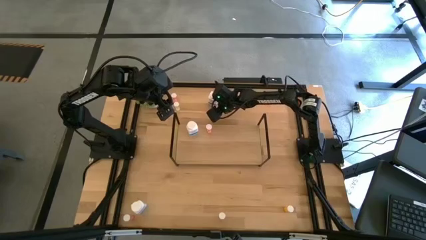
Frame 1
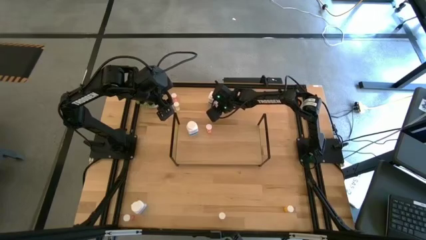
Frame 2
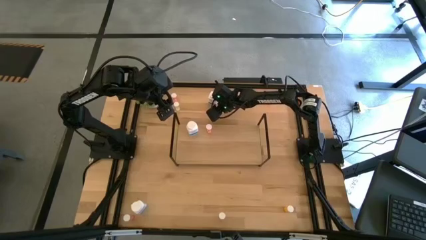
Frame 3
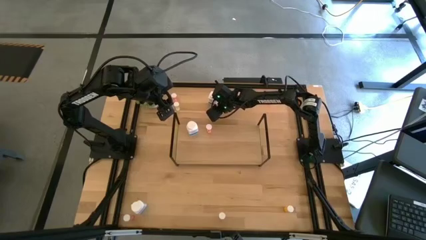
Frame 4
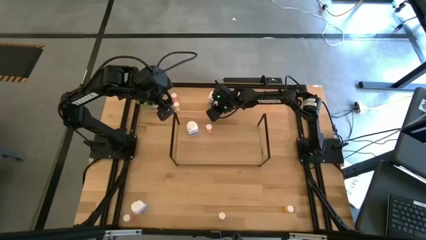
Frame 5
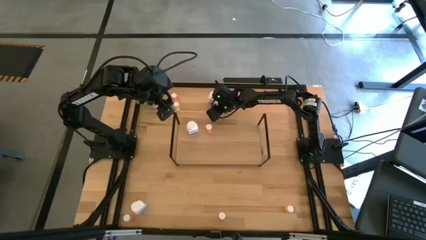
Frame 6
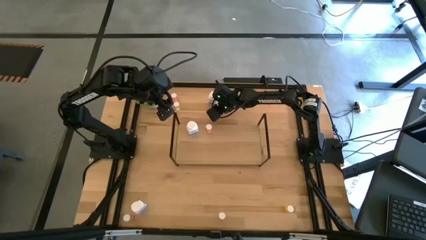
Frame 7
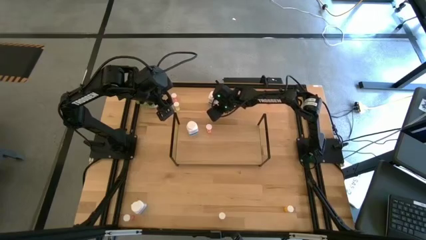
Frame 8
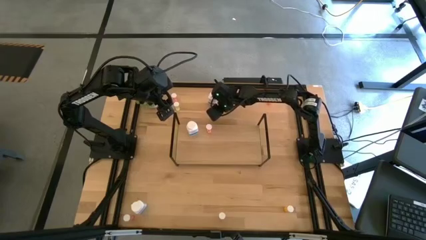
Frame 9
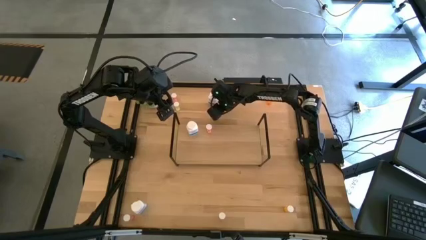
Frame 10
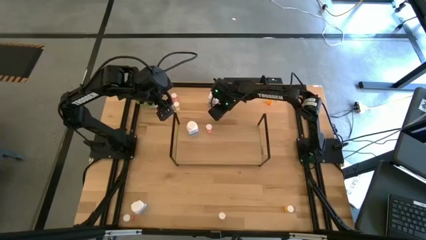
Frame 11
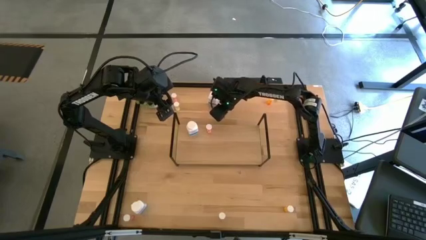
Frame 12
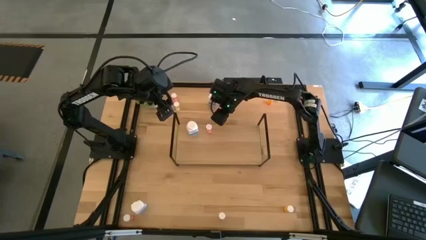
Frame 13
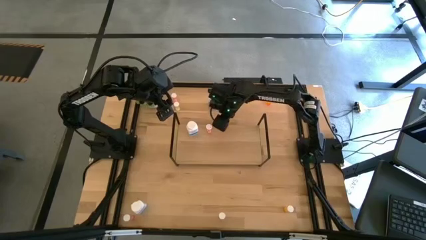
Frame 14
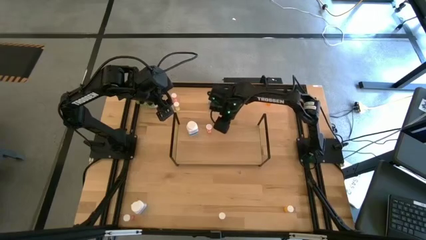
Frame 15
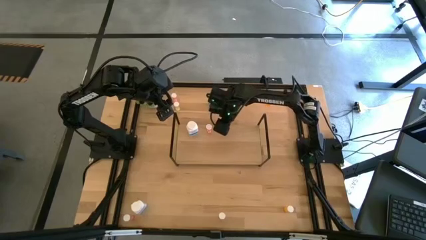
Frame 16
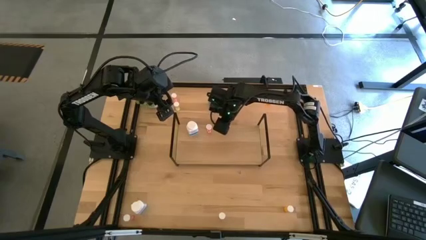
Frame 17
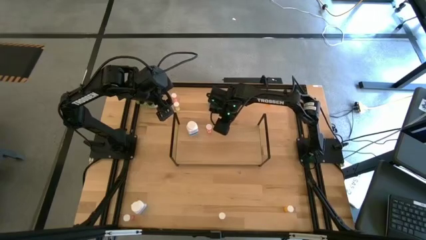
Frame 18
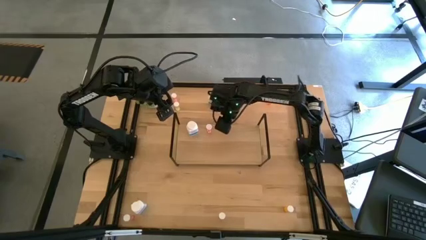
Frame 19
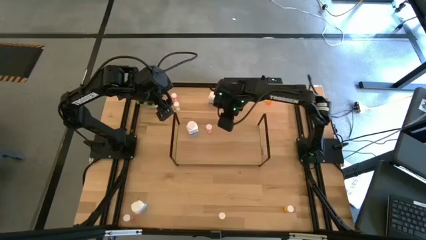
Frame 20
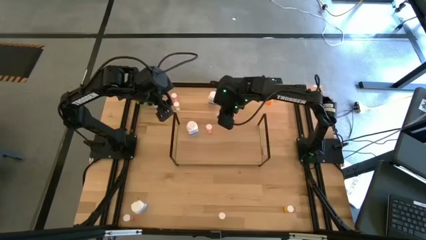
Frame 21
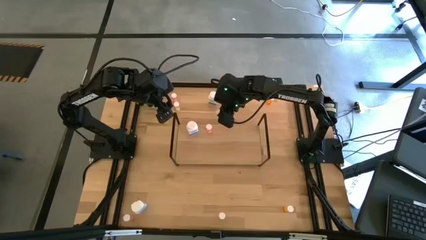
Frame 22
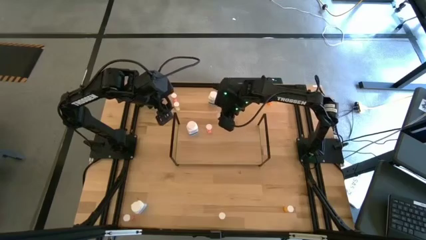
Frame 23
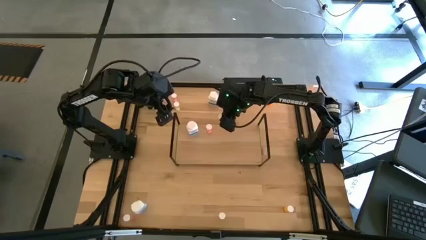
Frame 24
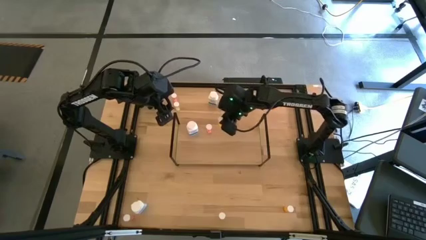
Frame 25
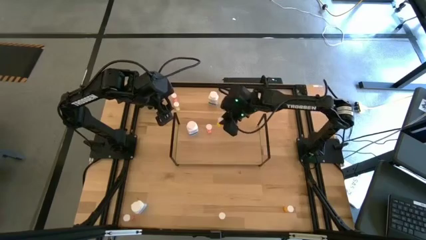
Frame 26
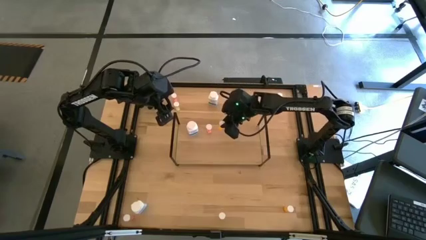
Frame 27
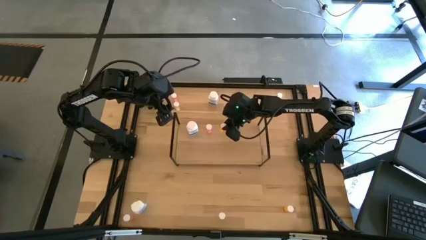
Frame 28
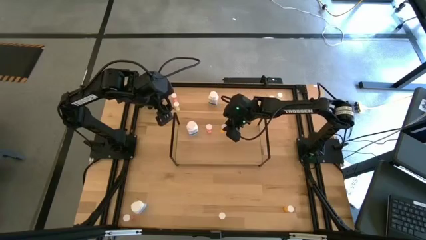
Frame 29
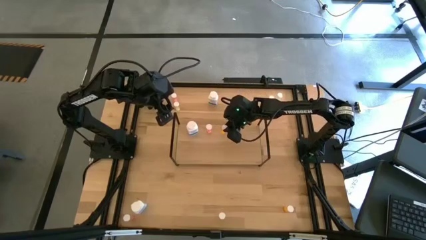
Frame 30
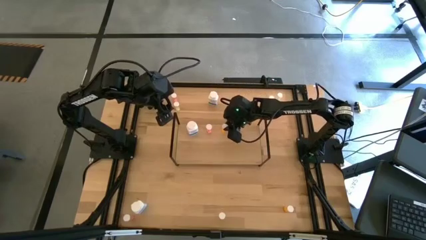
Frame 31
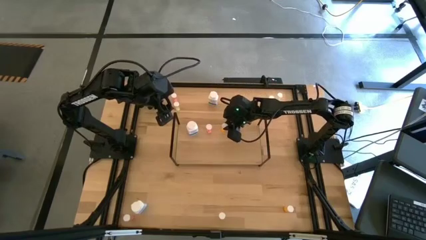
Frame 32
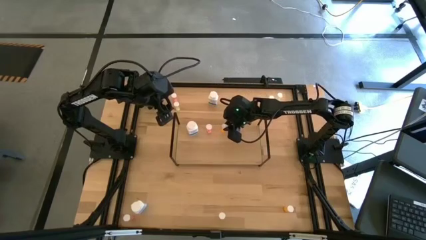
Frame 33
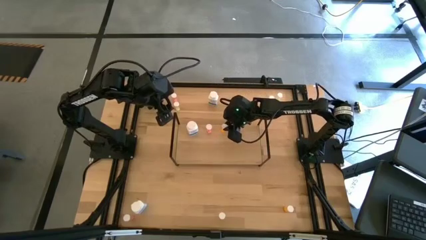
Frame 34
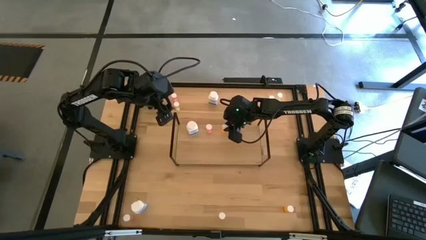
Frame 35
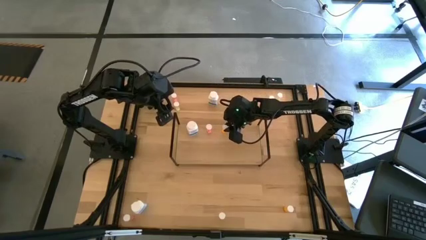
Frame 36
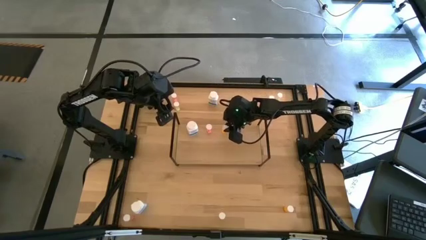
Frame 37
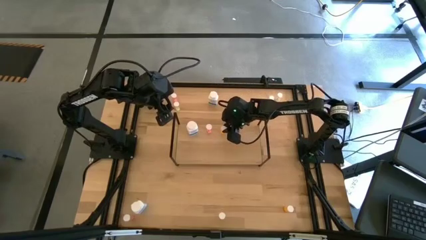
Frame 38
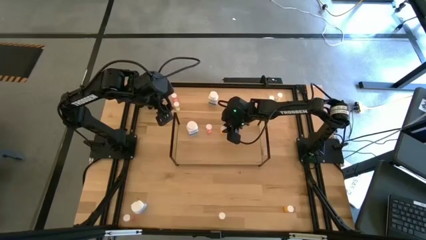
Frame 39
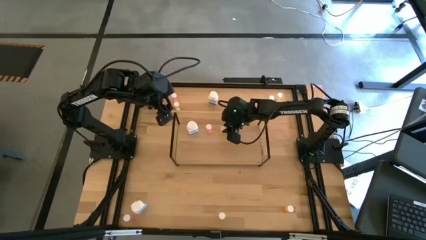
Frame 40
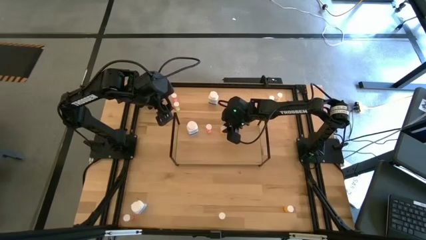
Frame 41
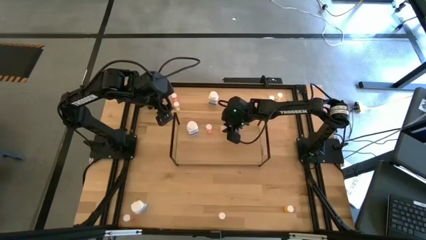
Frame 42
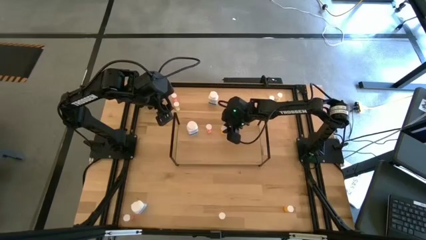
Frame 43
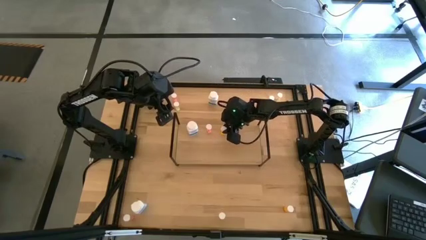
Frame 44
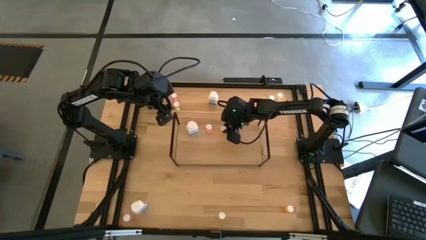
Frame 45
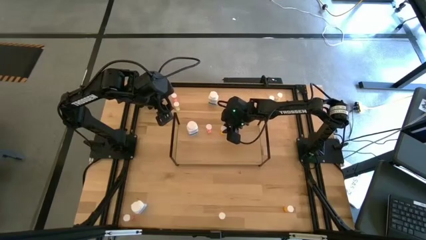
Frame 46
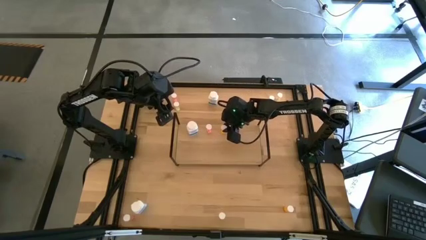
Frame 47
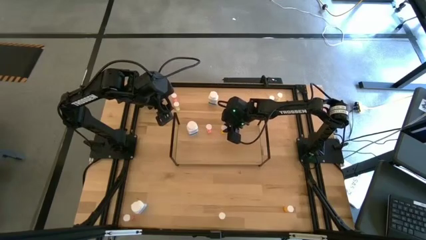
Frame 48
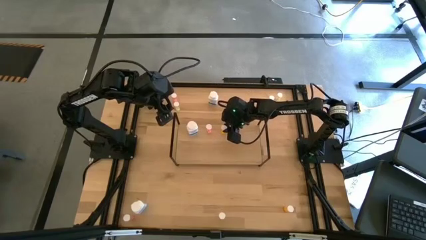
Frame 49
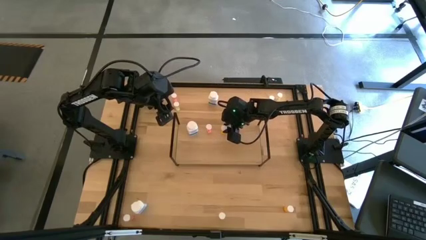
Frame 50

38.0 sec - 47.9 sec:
Task: Pick and place medicine bottles onto shelf by color
Put the left orange pill bottle on the shelf

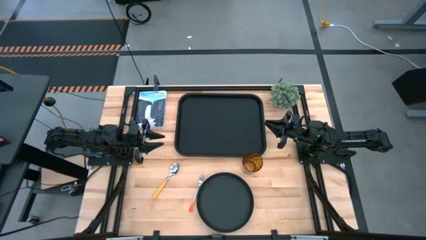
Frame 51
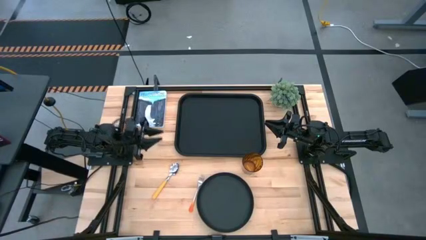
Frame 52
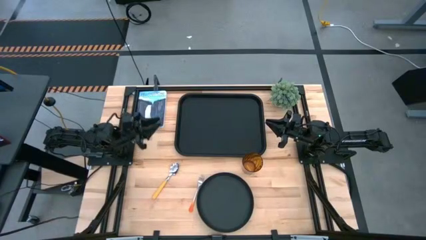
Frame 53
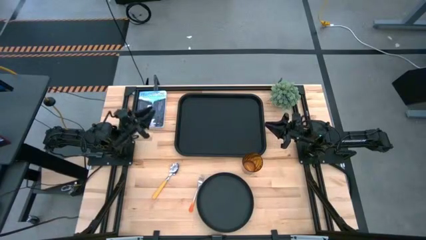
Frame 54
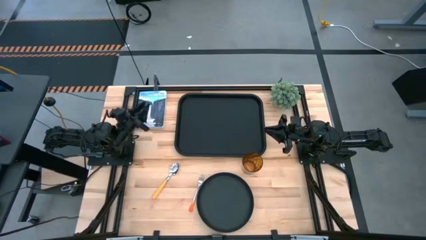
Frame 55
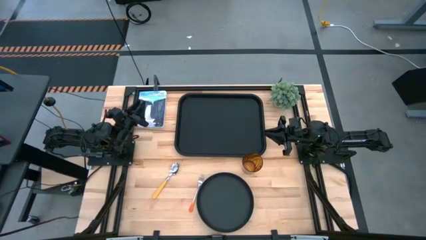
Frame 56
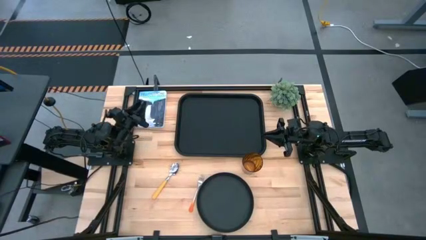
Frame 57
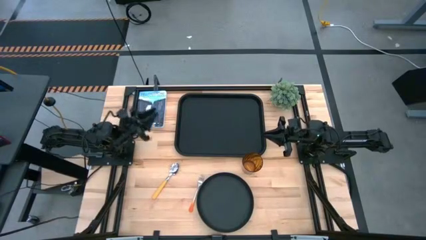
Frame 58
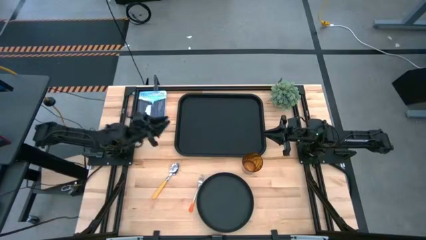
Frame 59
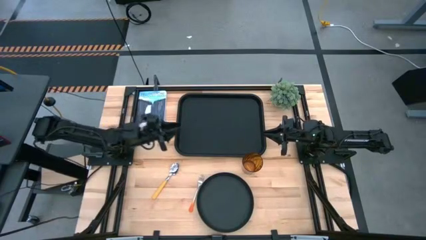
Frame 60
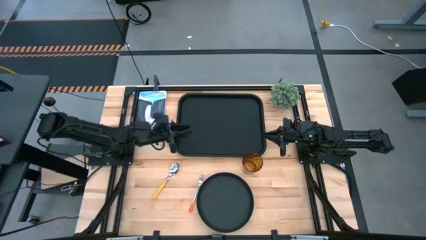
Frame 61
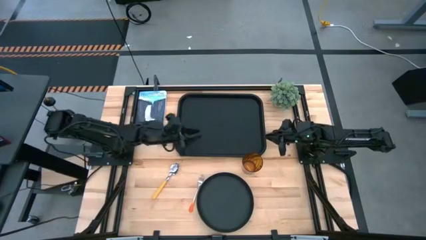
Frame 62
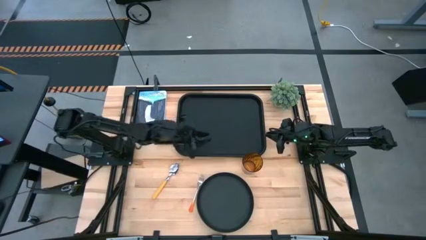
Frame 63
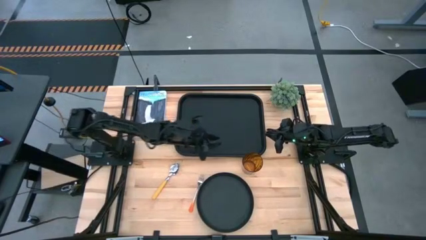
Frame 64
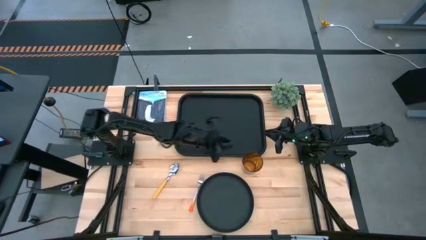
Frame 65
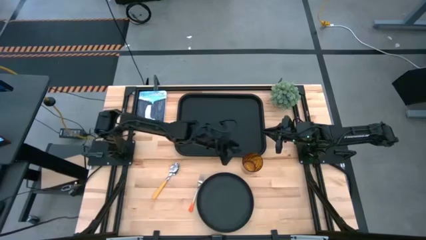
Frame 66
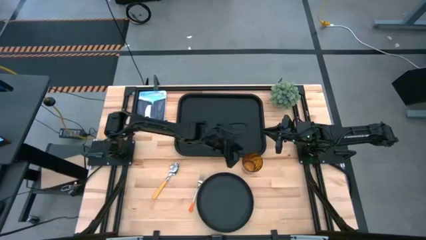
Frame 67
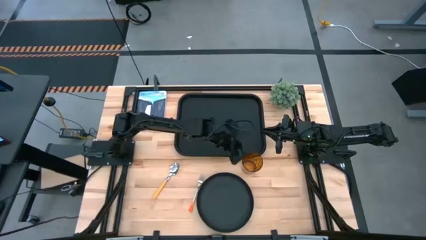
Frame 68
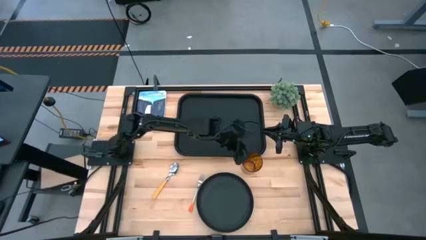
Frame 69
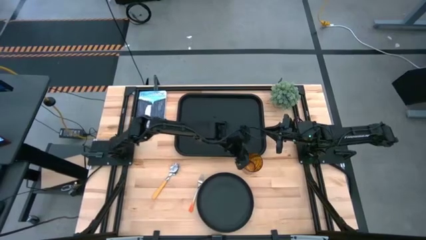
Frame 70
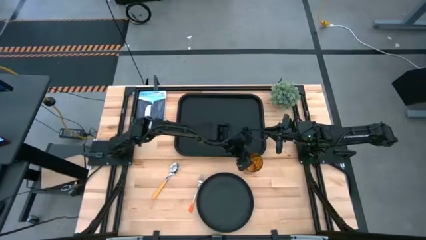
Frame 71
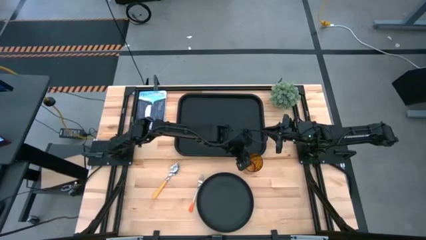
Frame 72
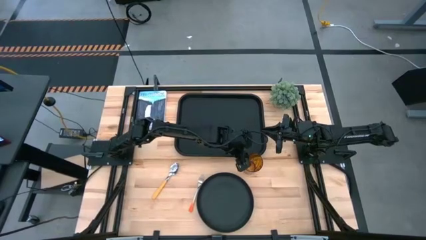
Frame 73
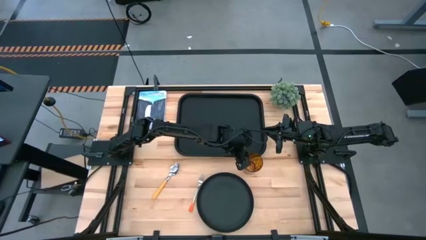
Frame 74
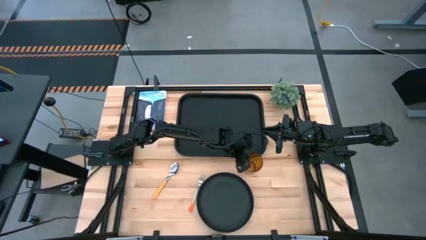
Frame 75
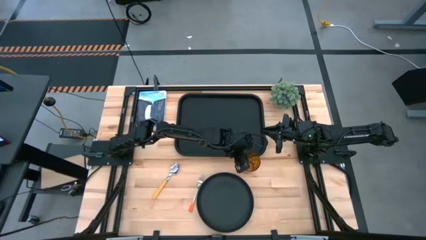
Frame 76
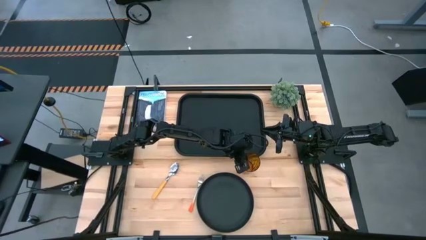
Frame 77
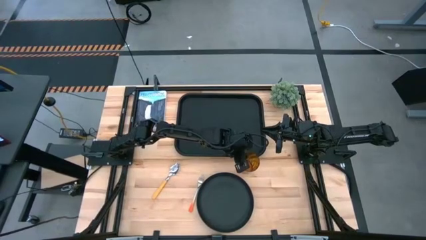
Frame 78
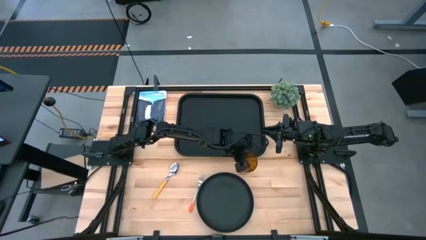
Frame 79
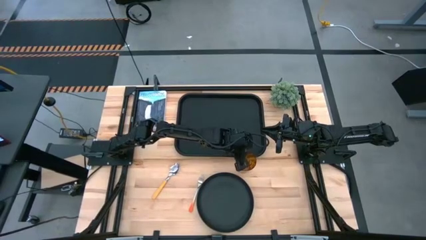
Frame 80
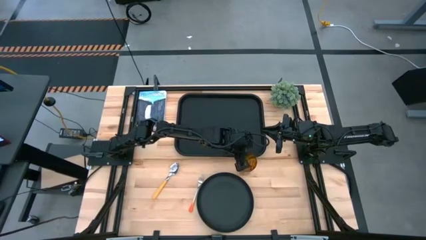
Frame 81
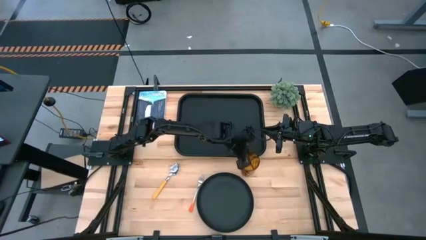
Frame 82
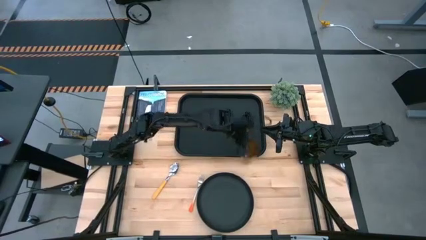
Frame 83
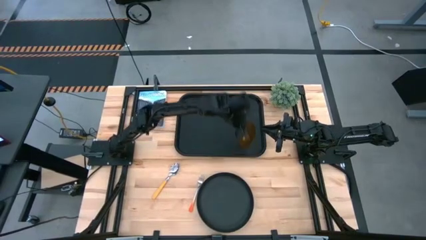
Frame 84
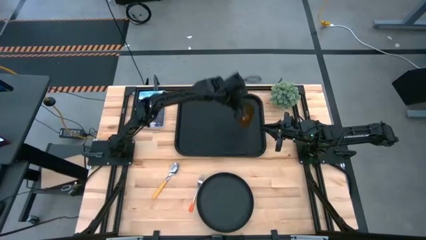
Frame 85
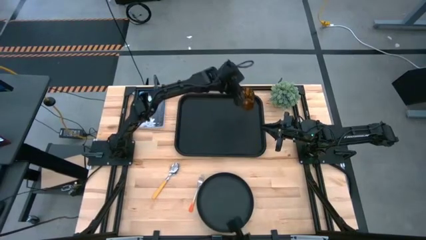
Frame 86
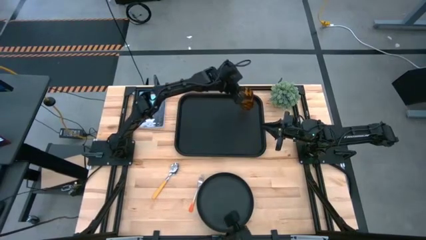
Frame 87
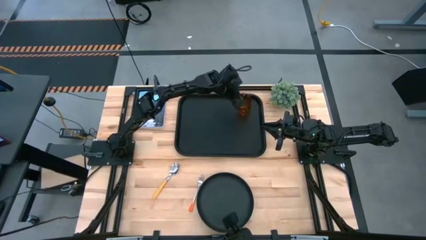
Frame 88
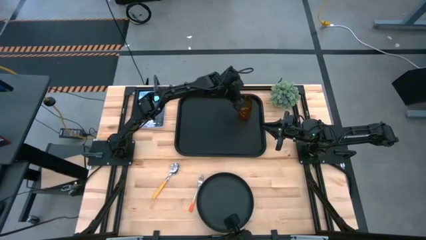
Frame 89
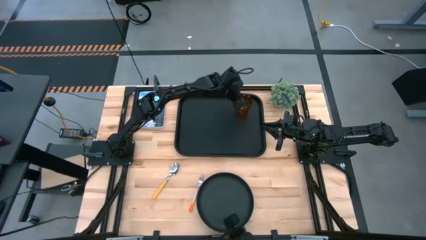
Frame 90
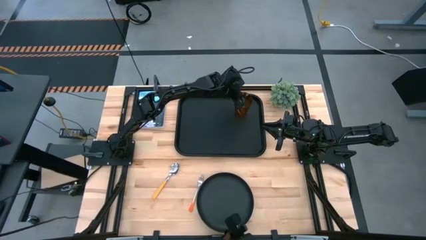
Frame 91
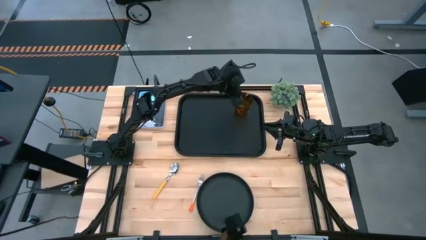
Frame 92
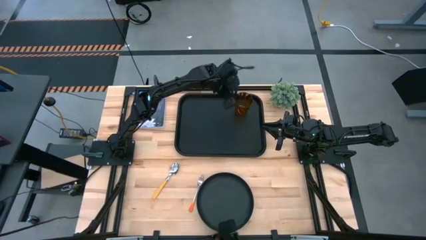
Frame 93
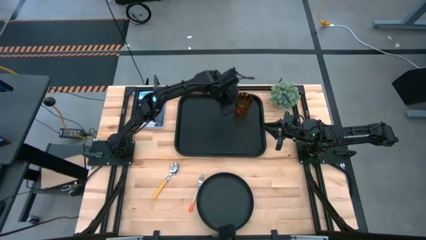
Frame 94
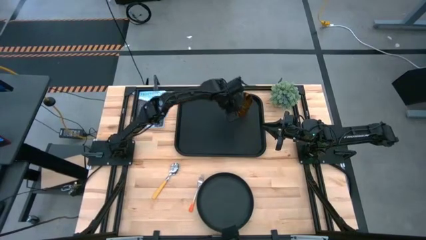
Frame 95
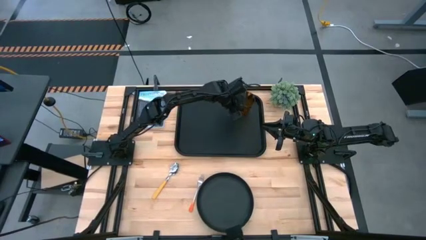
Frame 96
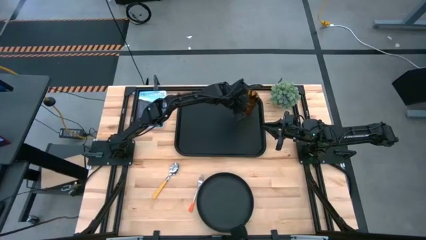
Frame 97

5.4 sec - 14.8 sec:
Task: Pick and place plate/cup/fork/spoon on tray
Put the orange cup on the black tray
